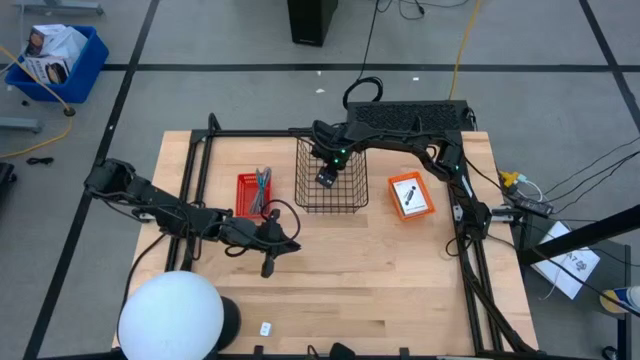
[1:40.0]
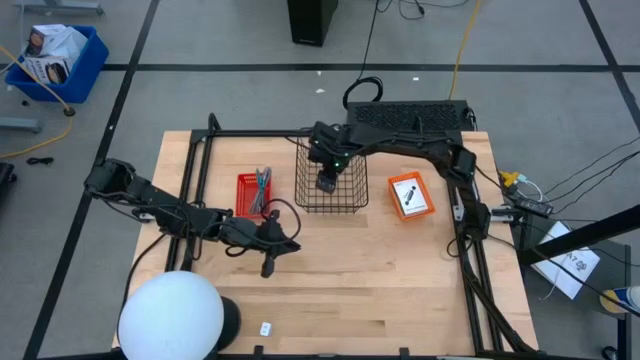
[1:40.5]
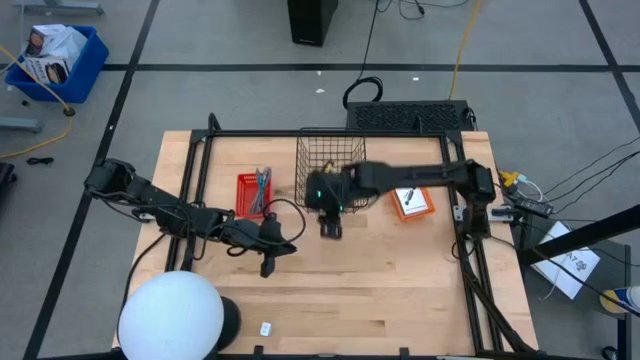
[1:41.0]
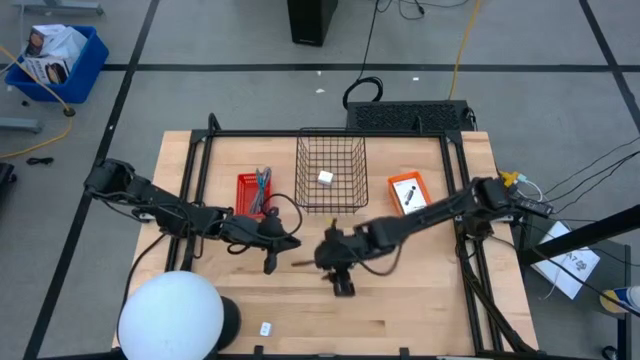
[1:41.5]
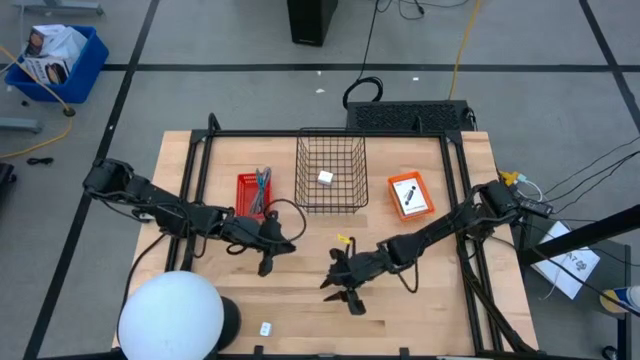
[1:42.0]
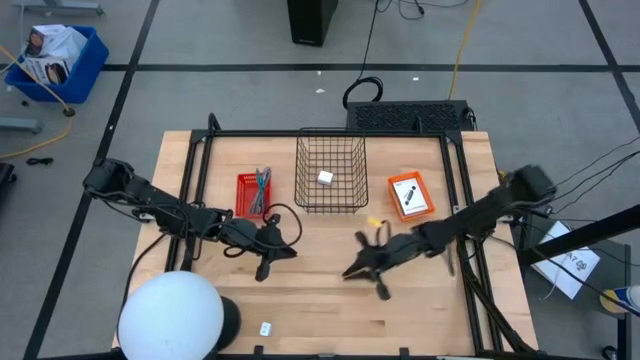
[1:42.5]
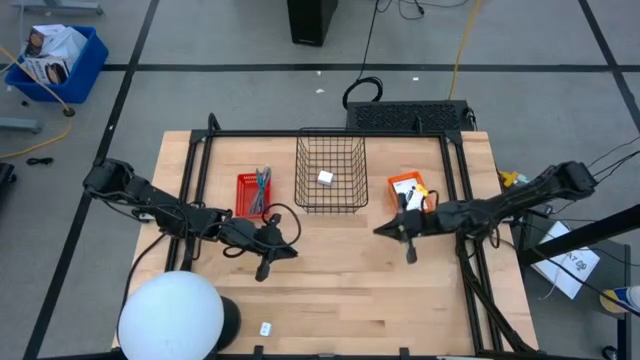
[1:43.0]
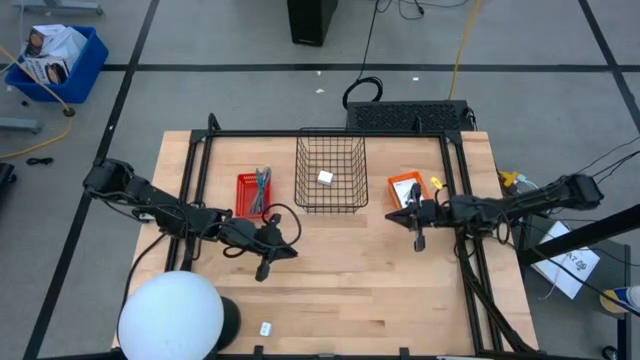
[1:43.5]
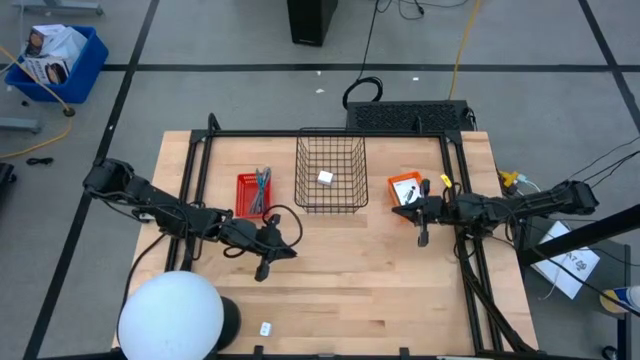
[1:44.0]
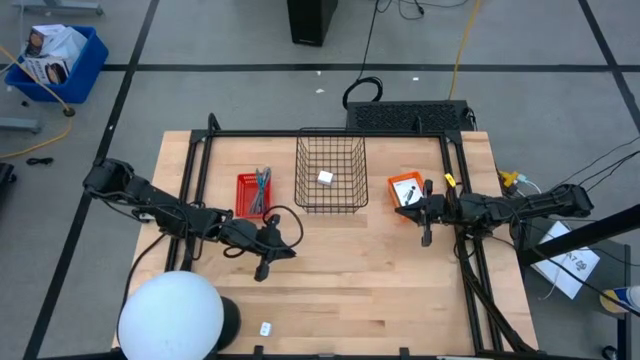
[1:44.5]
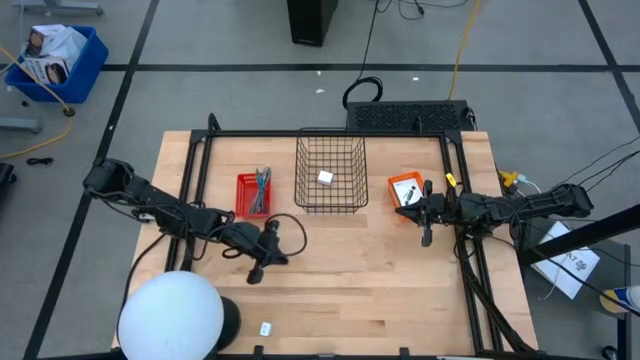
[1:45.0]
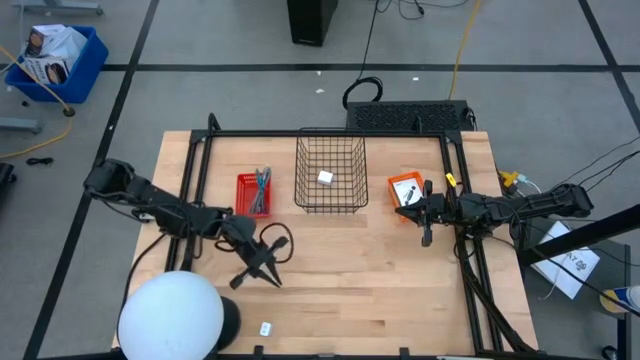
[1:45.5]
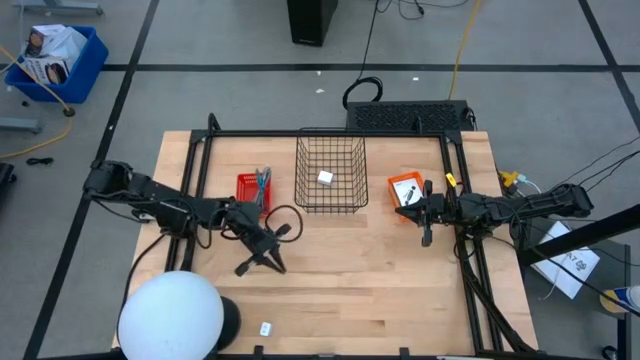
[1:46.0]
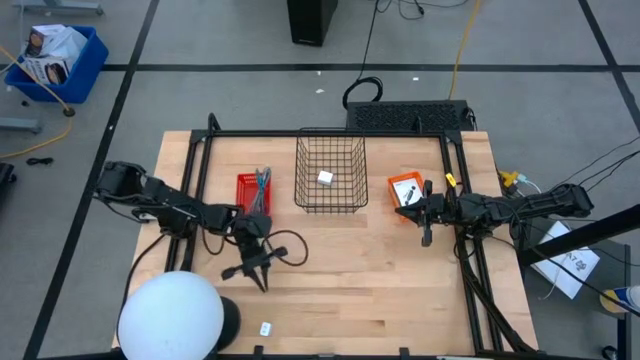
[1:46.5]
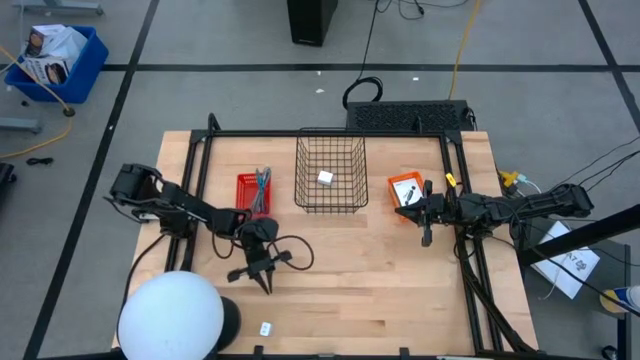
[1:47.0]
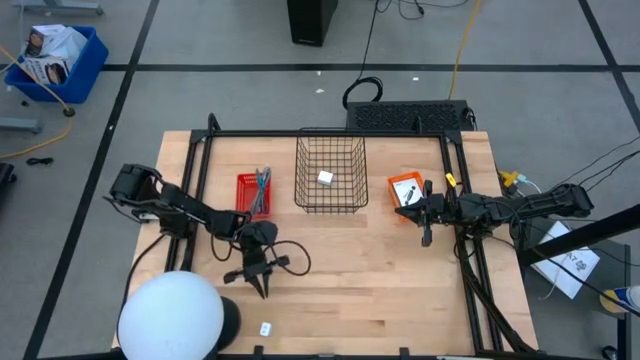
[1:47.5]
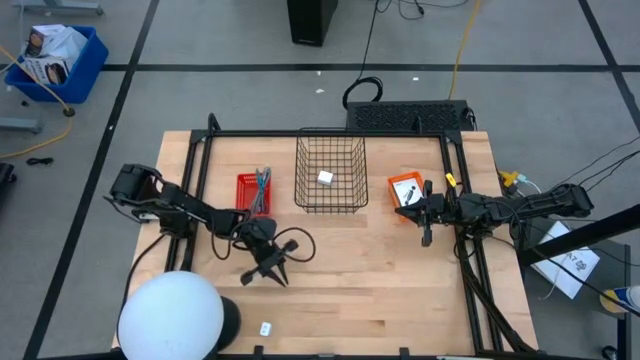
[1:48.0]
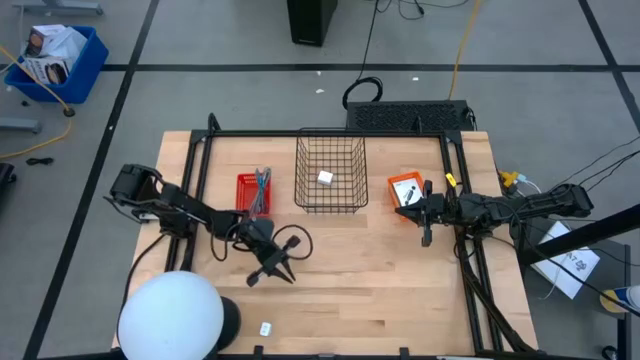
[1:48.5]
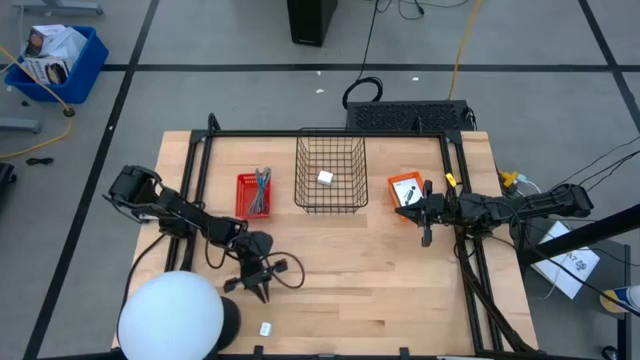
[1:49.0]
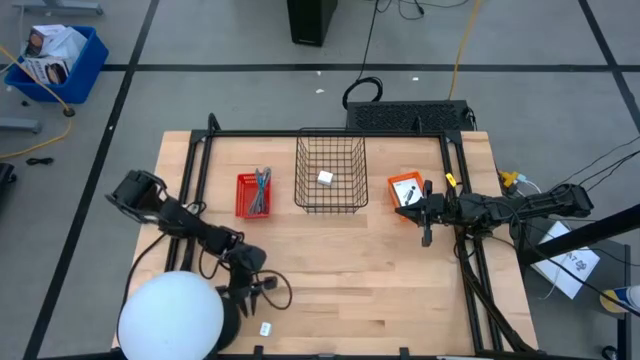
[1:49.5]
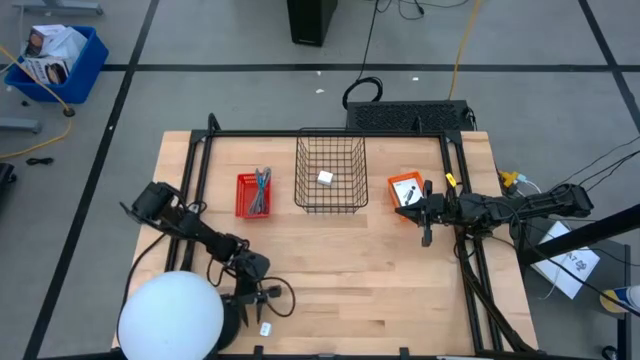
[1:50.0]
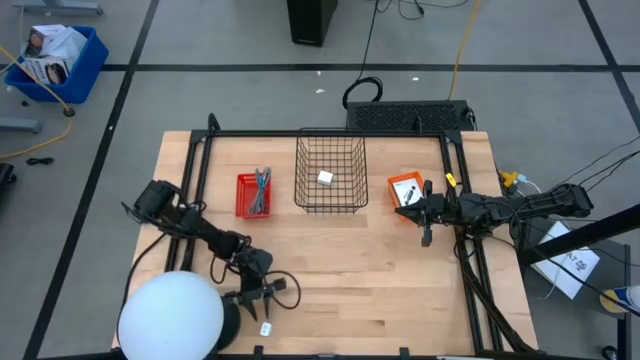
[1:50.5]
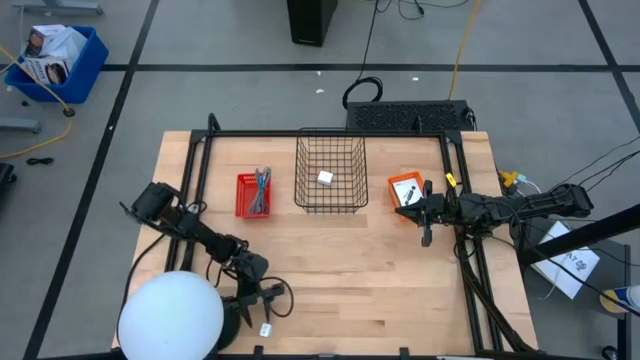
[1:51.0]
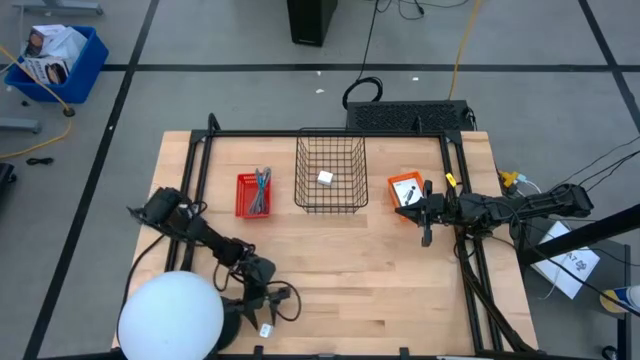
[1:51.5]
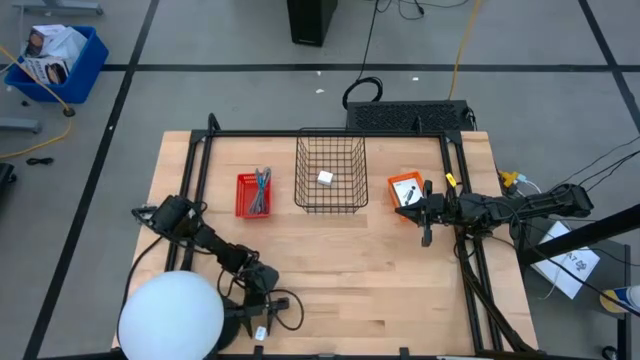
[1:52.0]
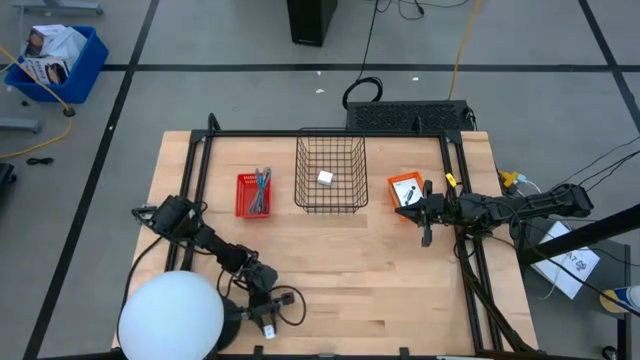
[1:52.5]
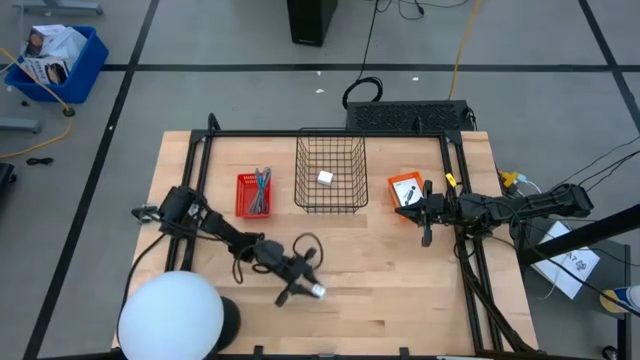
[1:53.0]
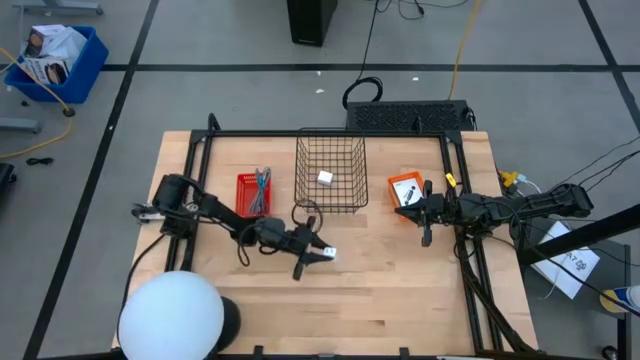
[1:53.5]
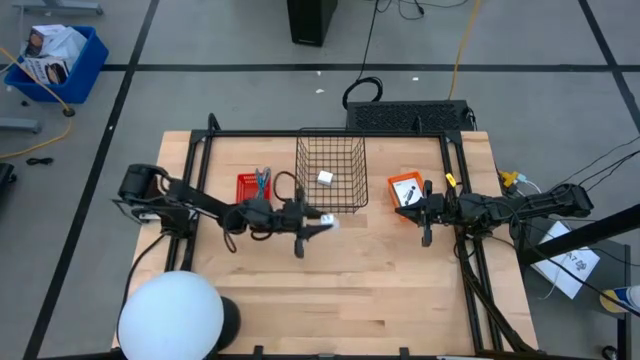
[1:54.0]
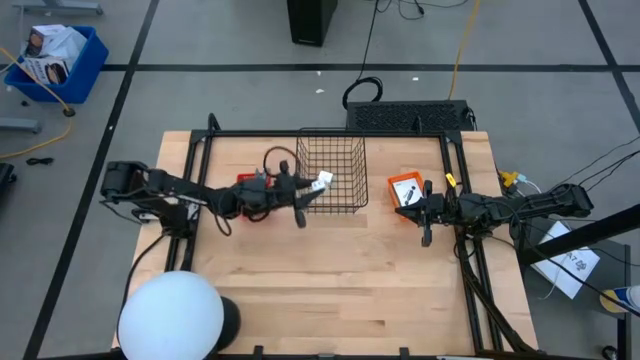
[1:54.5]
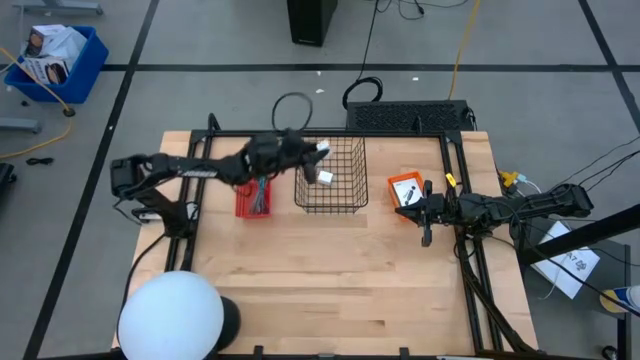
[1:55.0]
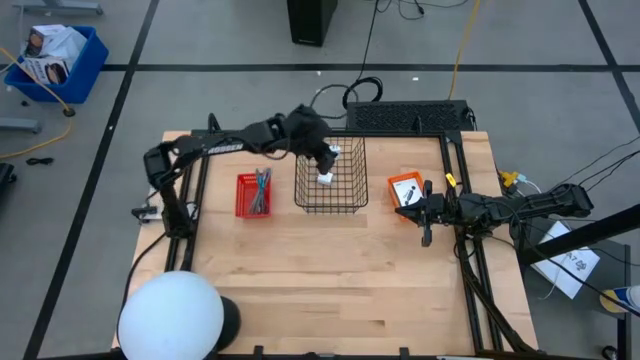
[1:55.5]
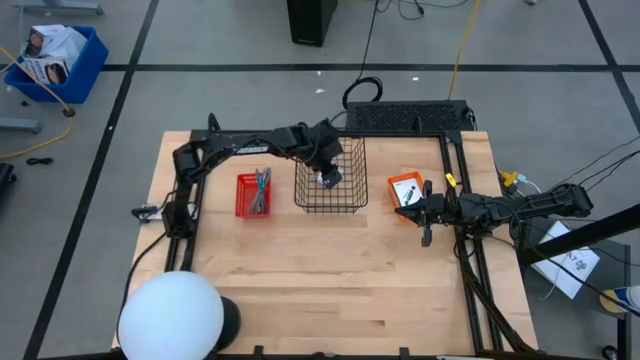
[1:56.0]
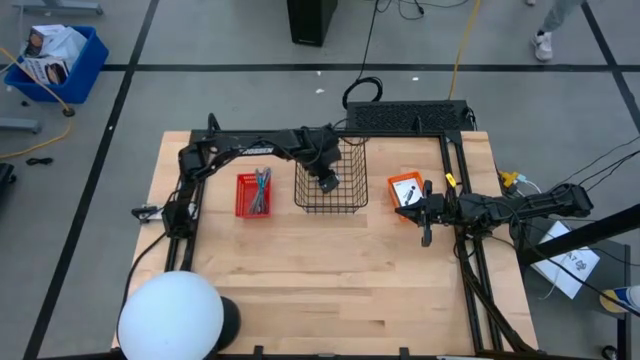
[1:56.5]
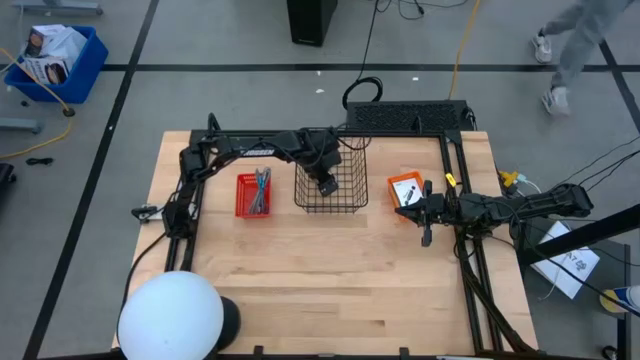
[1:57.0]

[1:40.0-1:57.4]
Task: Pick and place items into bin
Put the white charger adapter into the wire basket
